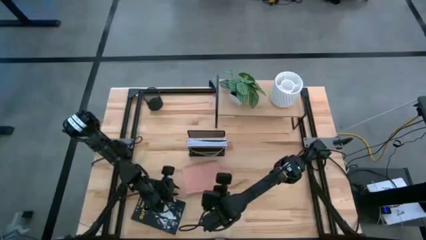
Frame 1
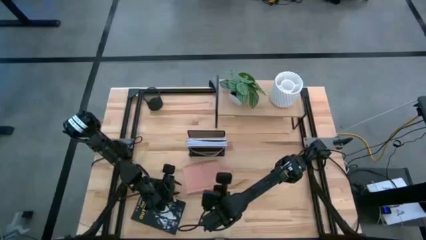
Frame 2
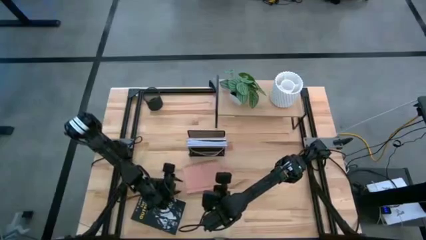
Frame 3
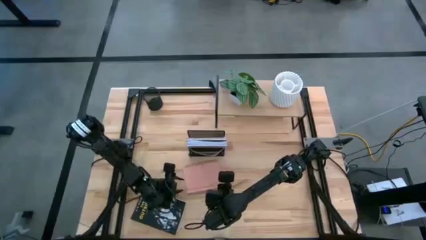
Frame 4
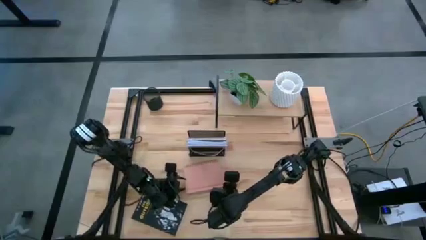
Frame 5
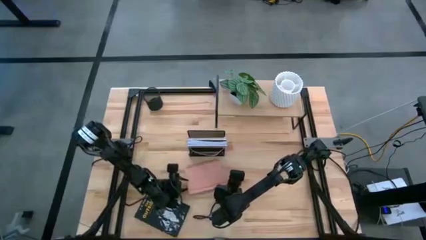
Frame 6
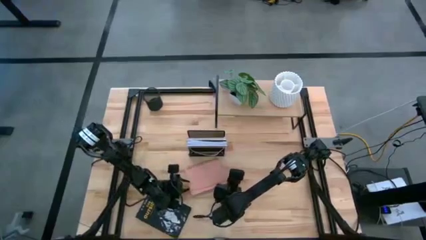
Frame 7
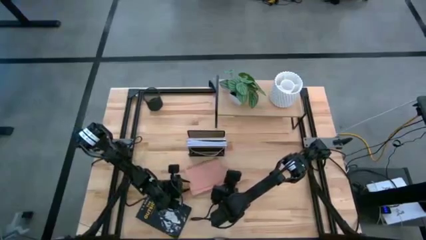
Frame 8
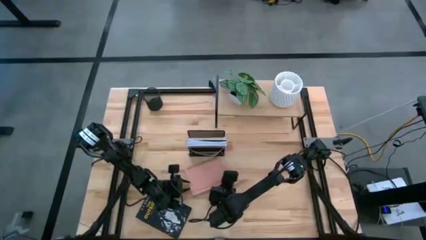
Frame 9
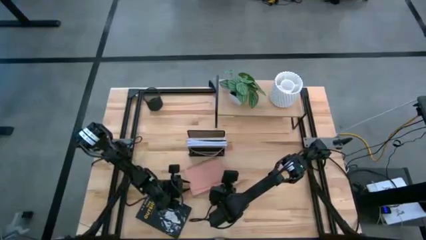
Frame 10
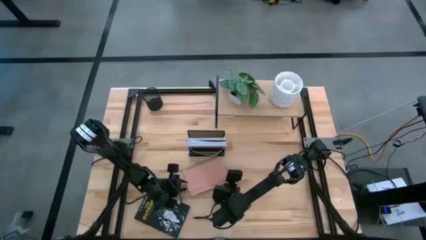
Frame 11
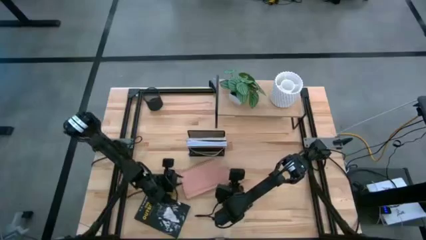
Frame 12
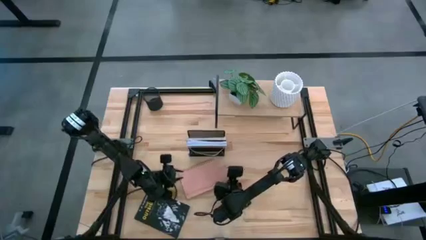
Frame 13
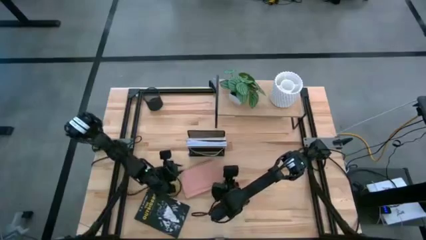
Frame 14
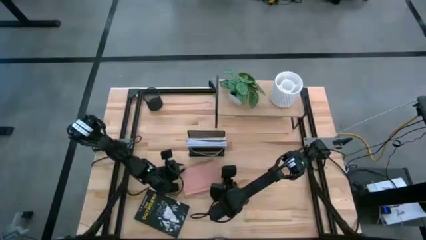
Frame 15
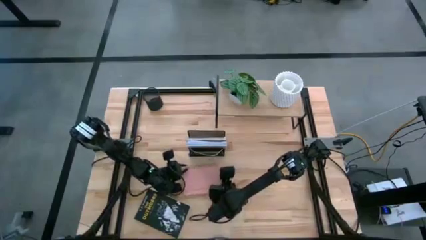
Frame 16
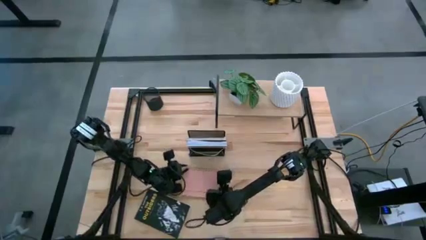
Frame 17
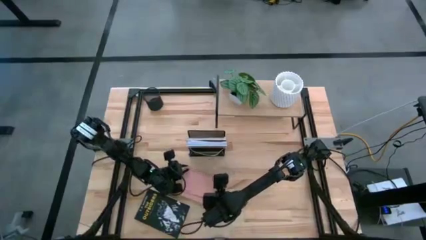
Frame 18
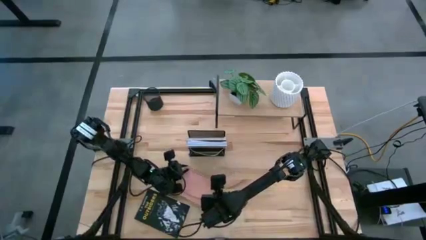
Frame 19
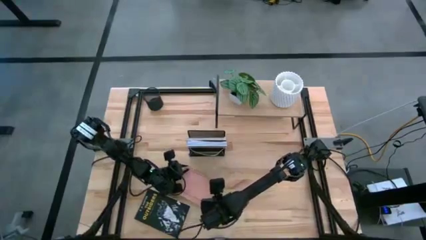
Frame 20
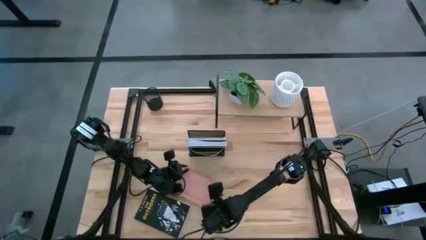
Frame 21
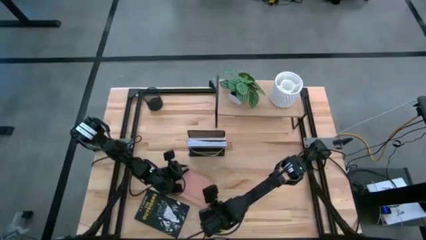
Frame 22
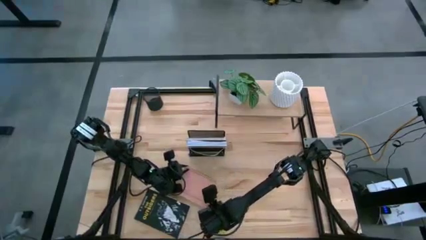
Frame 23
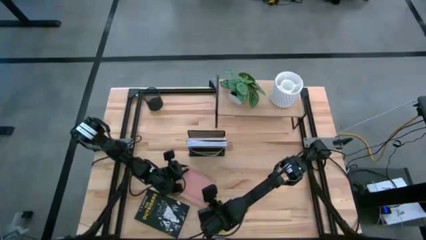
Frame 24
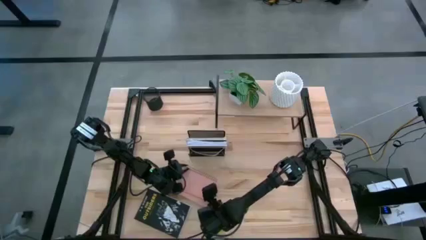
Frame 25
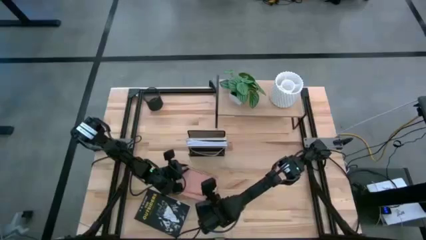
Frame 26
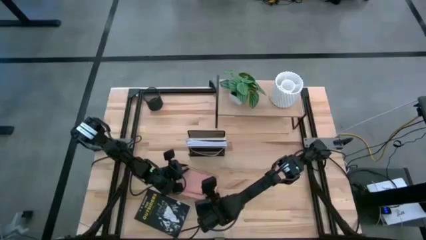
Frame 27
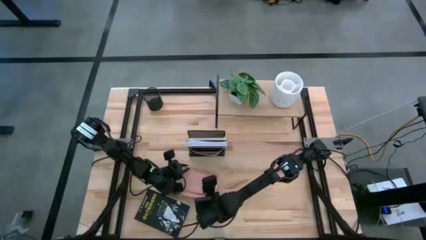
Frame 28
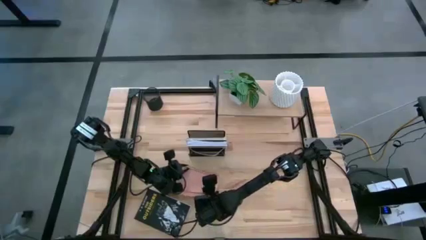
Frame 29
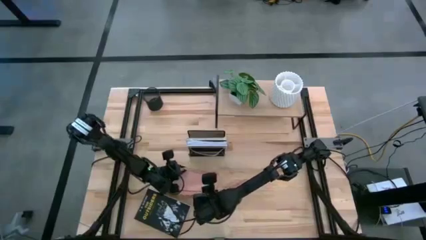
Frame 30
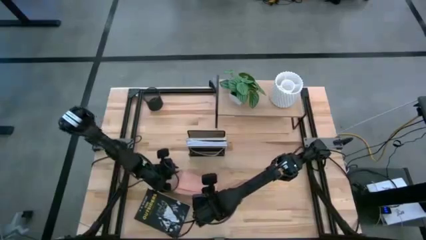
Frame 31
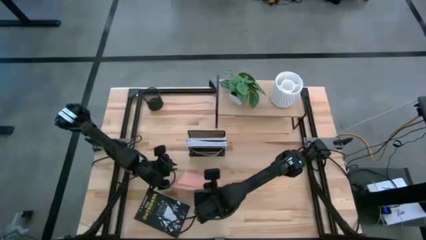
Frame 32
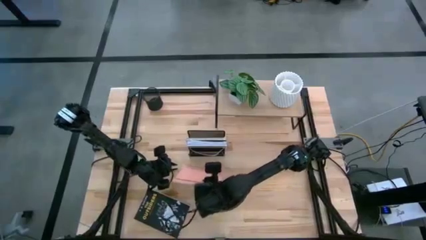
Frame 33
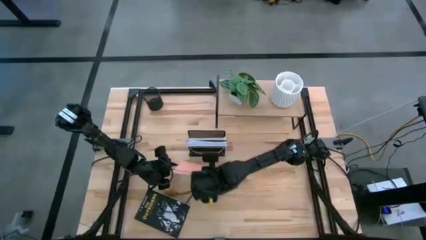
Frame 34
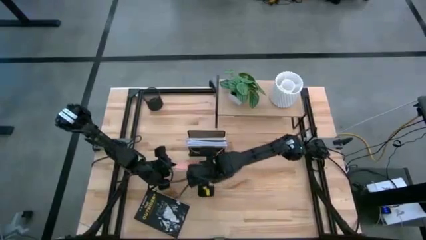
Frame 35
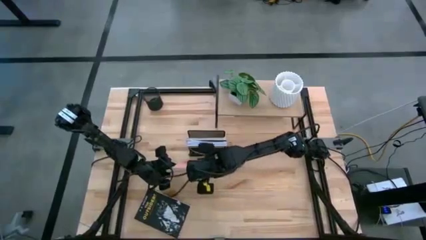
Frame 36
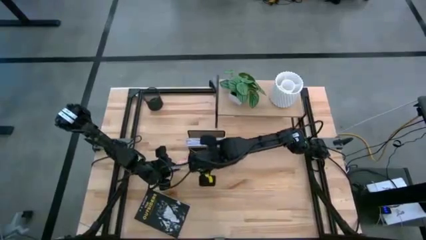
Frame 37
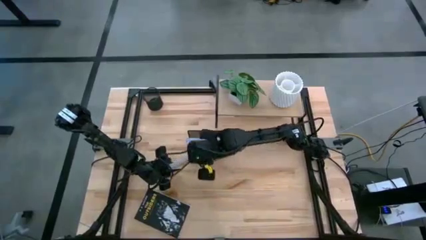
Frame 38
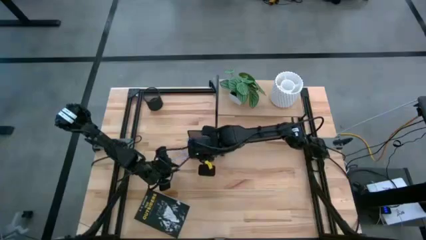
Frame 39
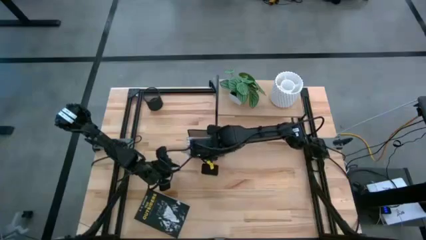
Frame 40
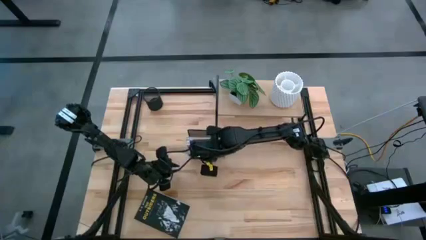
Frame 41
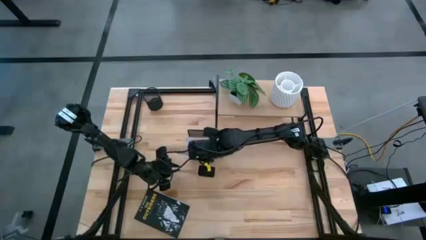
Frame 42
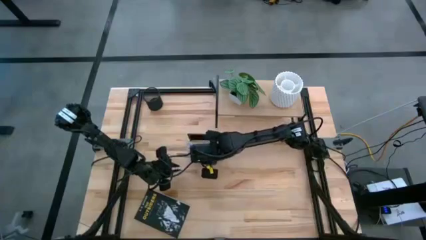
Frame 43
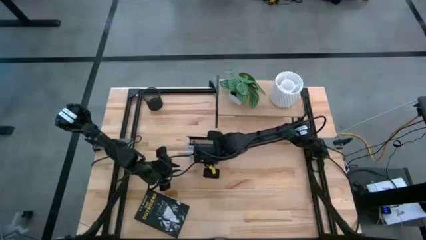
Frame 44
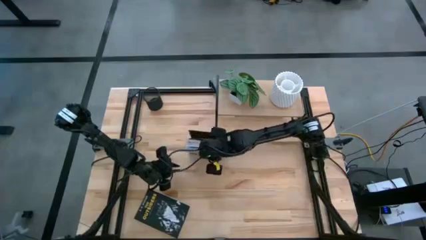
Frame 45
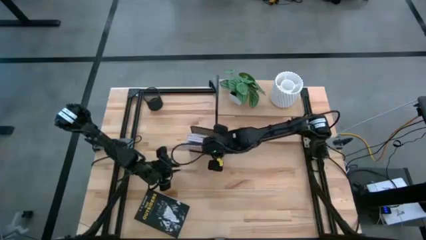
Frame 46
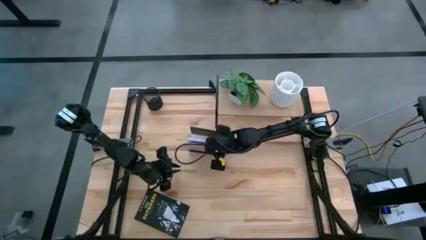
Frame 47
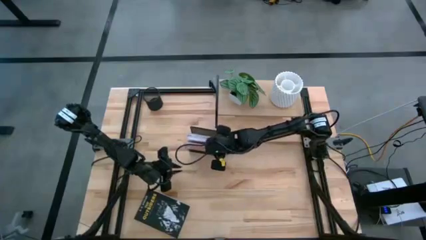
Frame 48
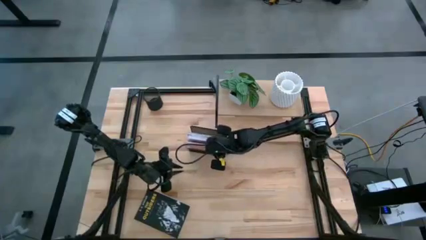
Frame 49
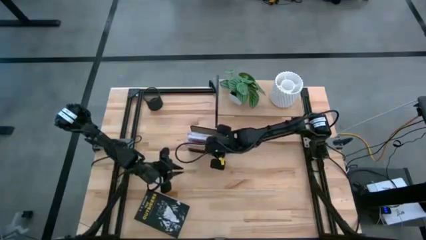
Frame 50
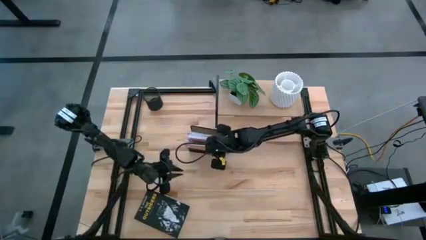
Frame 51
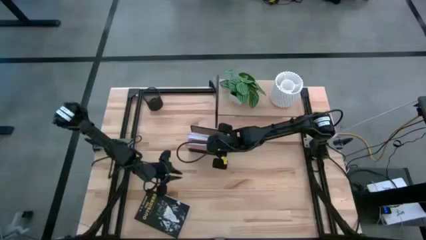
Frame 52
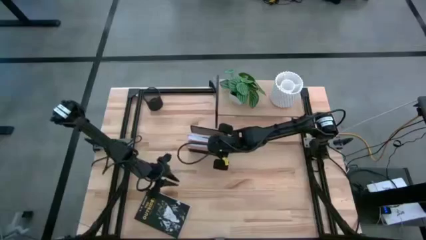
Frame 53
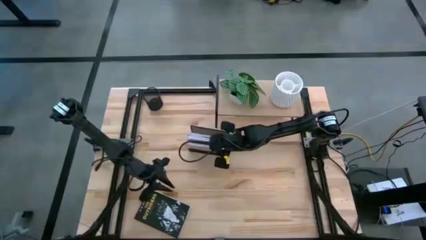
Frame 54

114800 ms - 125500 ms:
Task: Stock shelves
Put the pink notebook into the black mesh bookshelf
